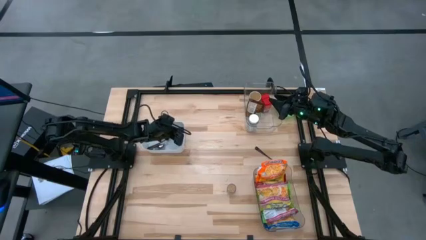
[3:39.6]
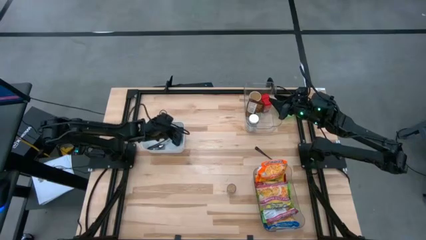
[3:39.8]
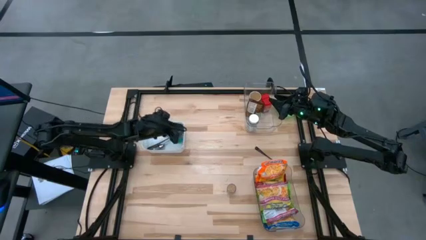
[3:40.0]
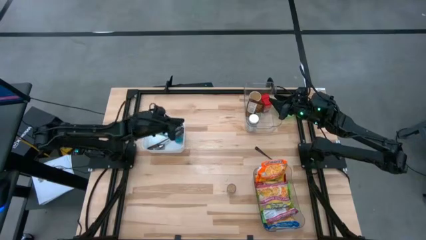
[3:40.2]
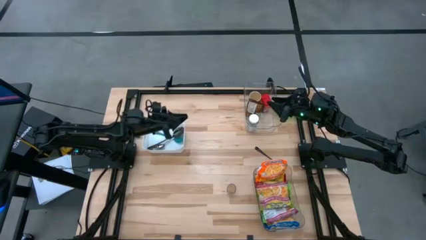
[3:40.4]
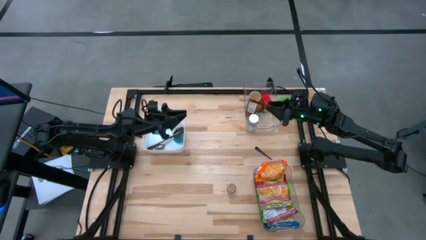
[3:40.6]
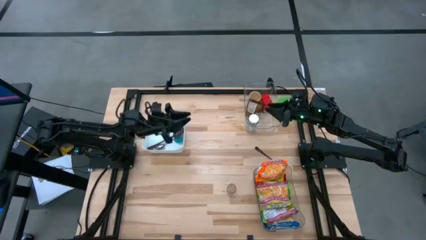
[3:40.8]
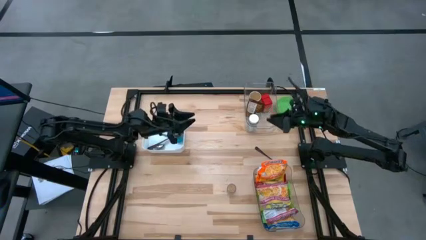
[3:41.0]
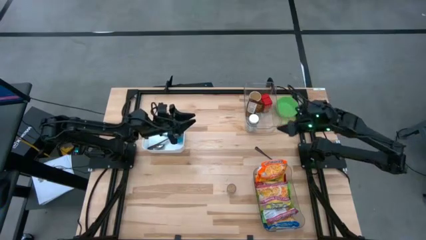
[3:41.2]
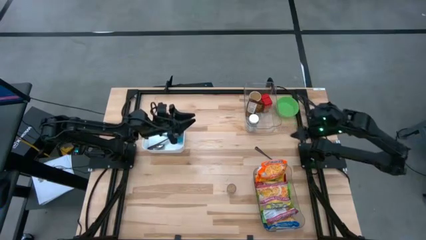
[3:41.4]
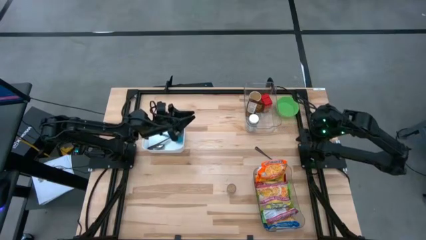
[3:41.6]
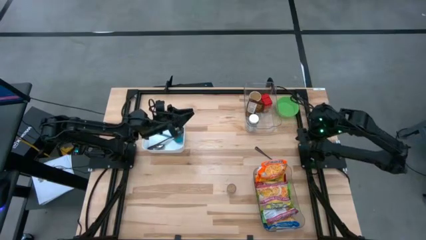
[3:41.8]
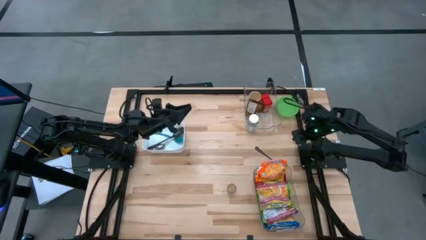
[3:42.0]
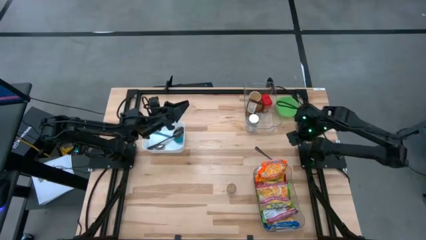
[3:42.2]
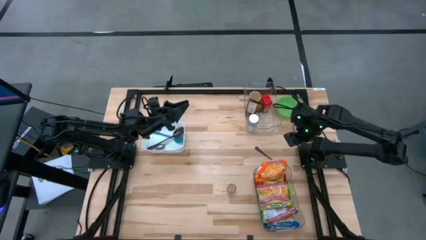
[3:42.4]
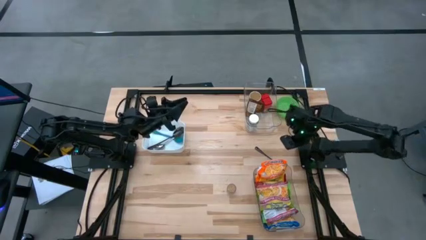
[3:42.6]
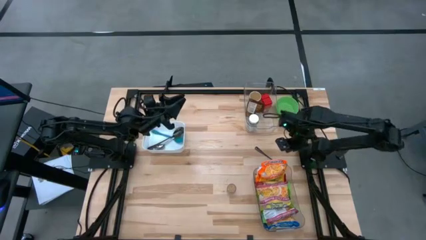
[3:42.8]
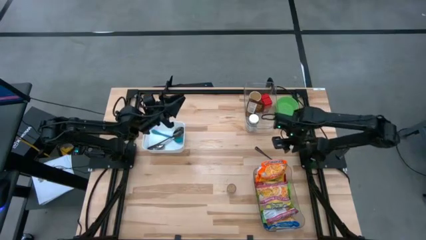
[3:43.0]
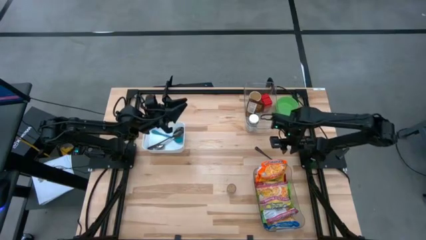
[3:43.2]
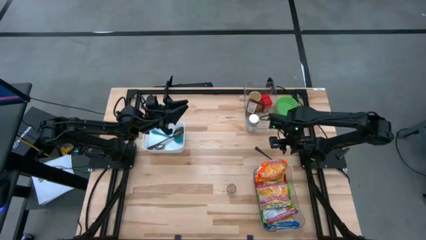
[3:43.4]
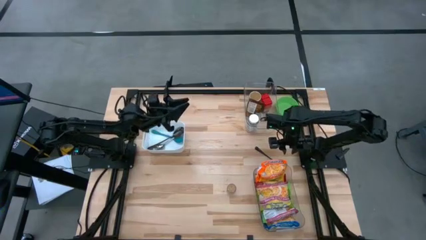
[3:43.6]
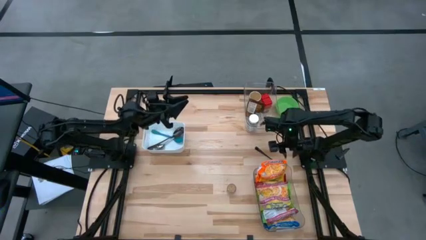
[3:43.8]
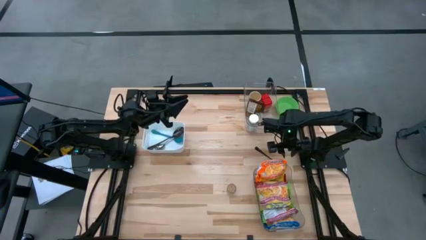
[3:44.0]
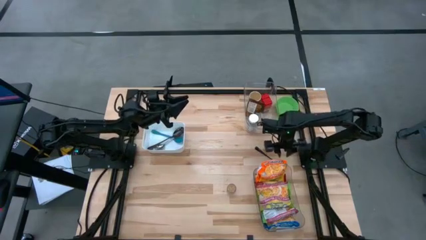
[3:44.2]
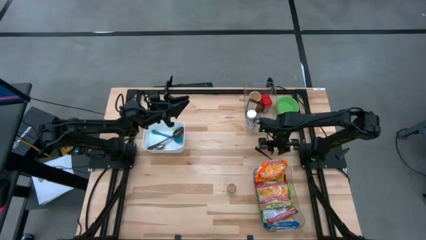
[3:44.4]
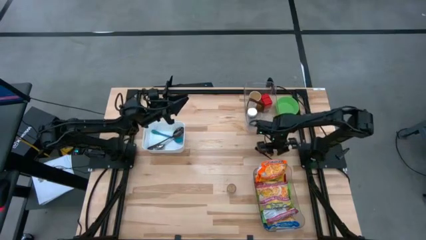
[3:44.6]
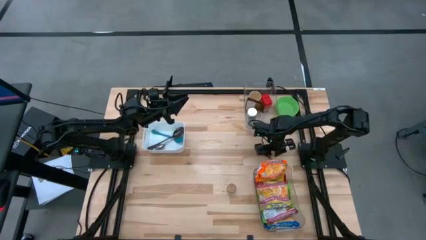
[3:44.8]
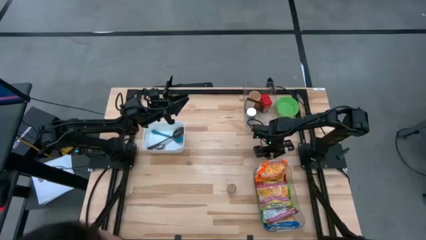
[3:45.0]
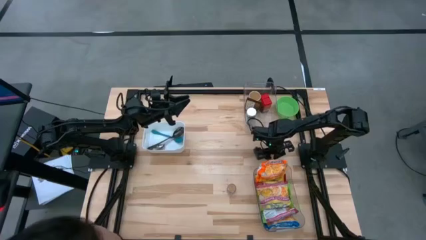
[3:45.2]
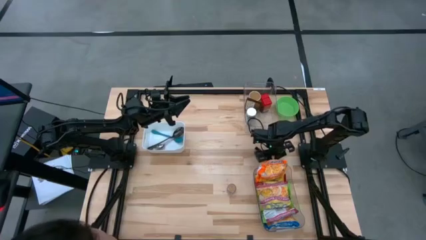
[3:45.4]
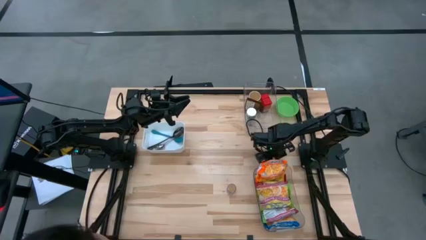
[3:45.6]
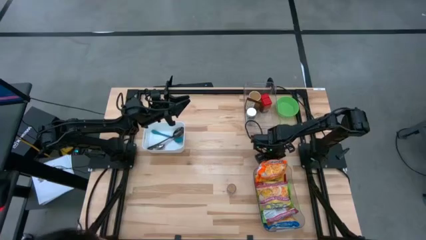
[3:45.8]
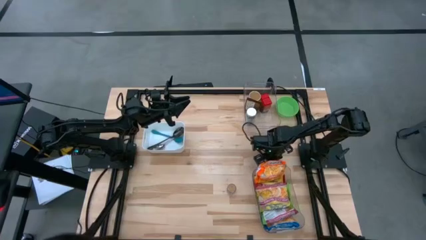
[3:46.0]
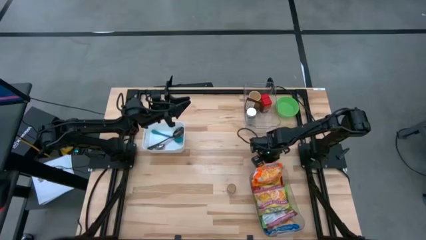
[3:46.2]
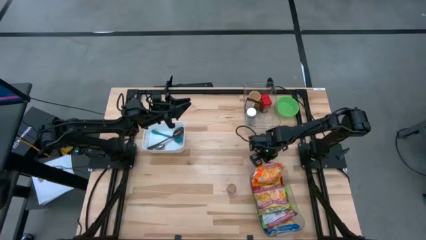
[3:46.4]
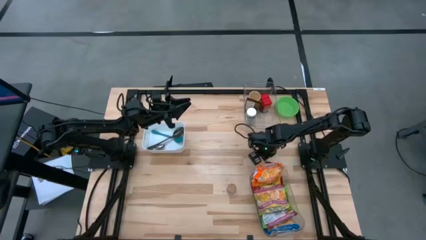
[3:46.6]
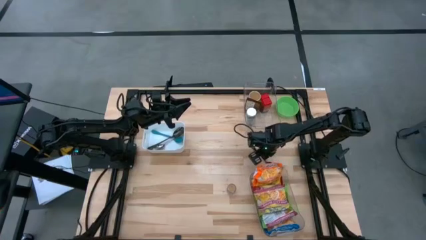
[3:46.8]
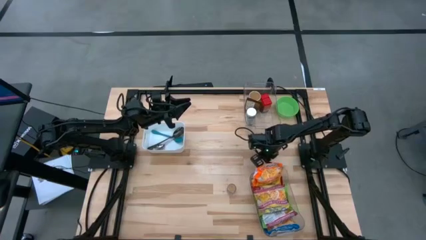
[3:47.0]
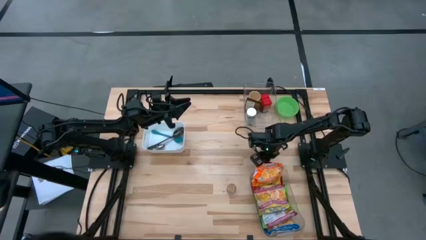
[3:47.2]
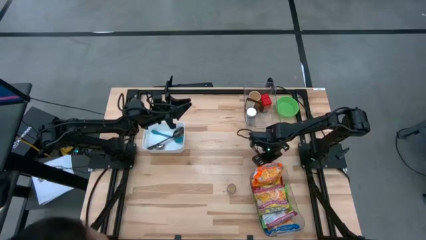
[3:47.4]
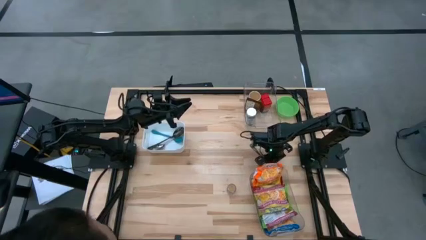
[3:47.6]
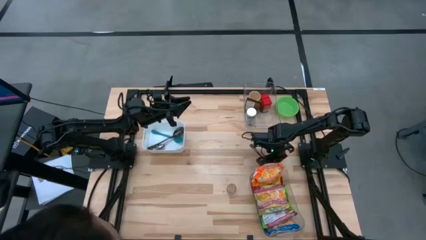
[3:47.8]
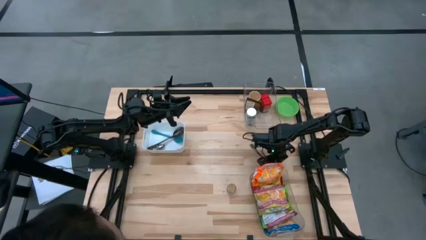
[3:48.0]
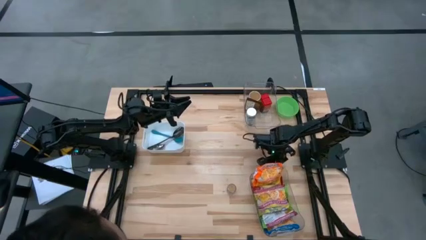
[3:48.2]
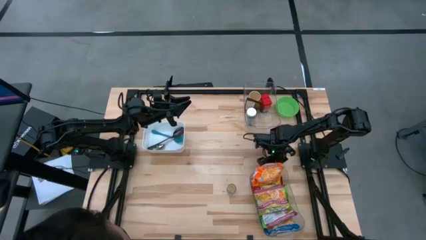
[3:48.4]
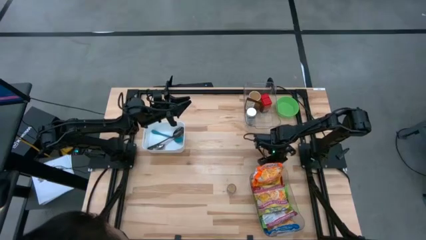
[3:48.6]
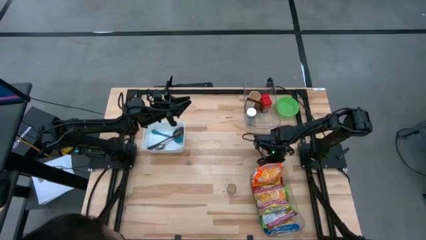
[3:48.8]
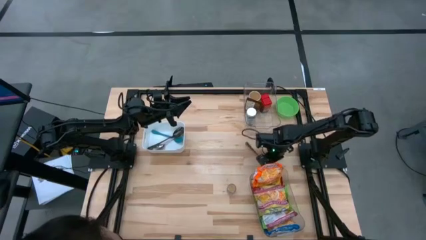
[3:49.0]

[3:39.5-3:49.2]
Task: Pick & Place Food Item
Put the black spoon into the white bin

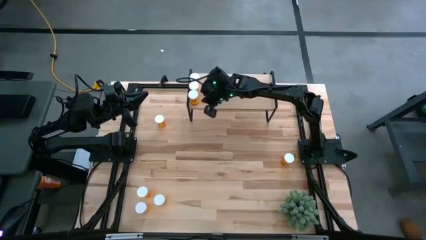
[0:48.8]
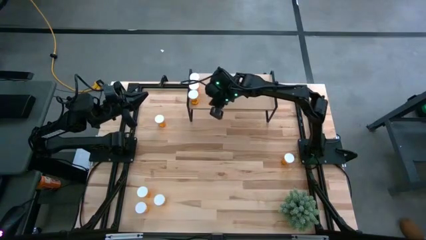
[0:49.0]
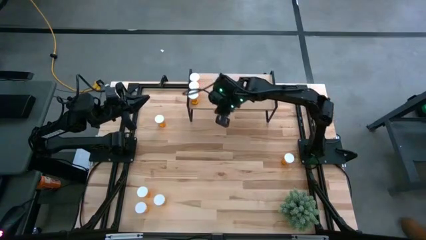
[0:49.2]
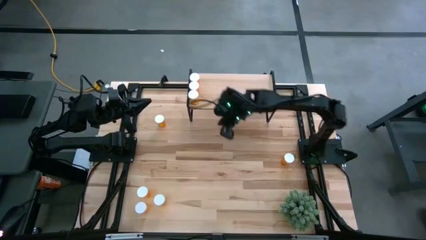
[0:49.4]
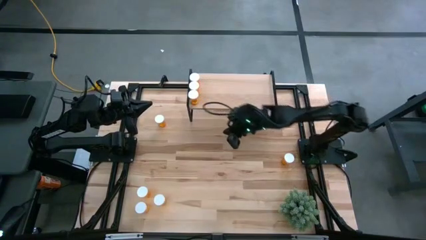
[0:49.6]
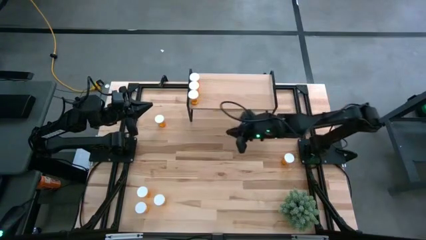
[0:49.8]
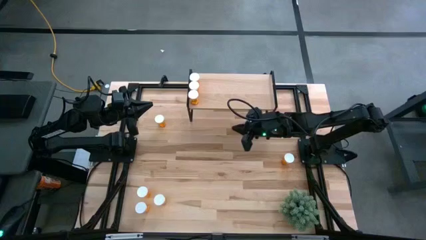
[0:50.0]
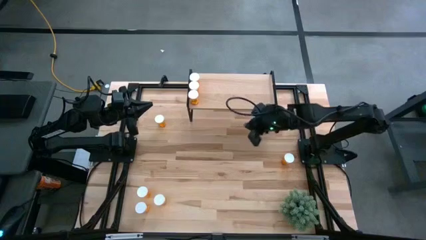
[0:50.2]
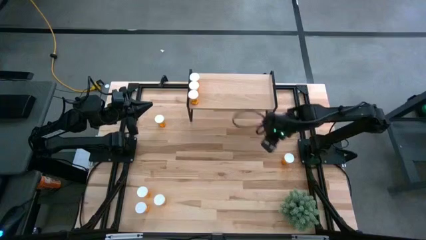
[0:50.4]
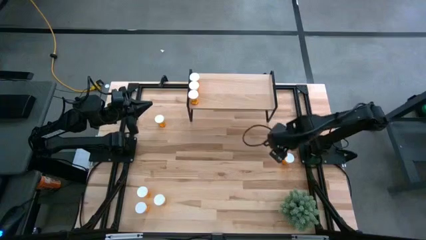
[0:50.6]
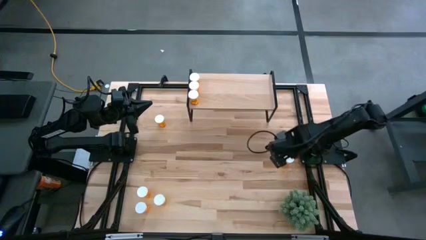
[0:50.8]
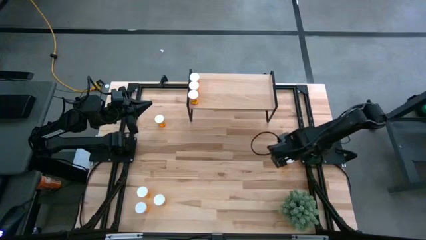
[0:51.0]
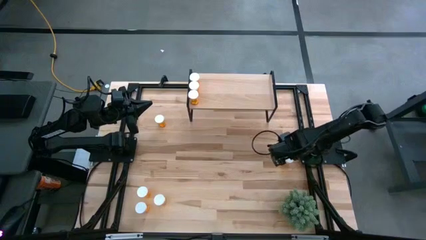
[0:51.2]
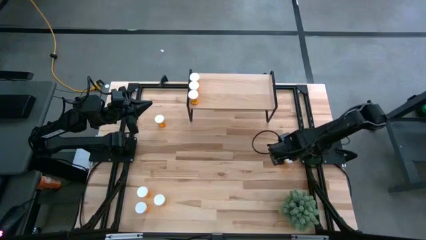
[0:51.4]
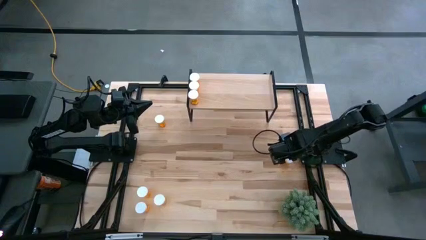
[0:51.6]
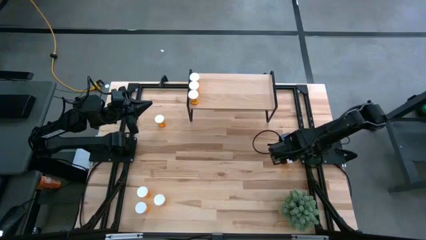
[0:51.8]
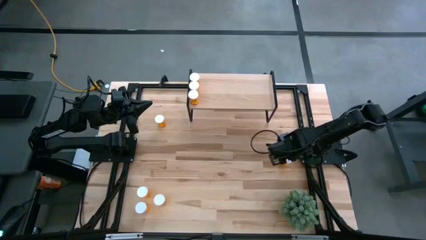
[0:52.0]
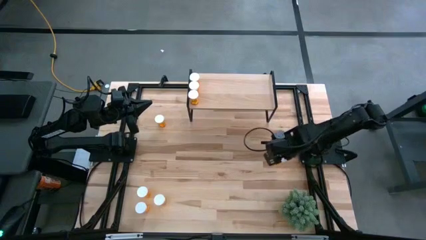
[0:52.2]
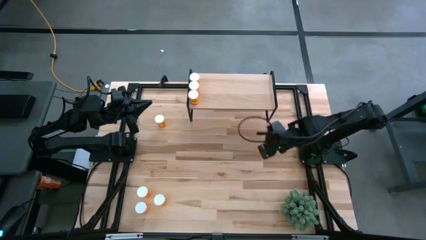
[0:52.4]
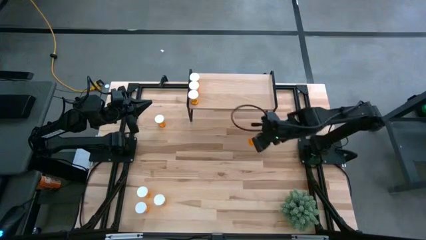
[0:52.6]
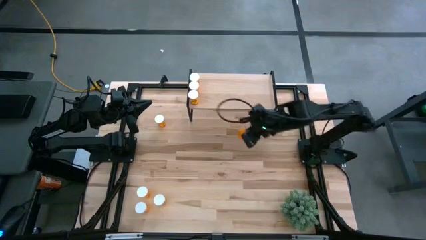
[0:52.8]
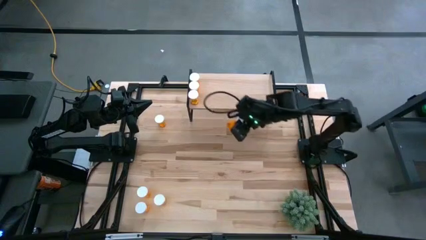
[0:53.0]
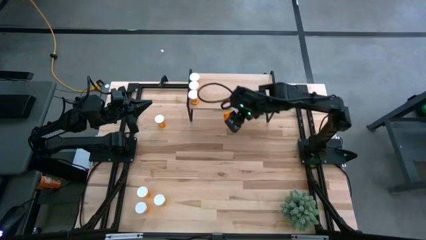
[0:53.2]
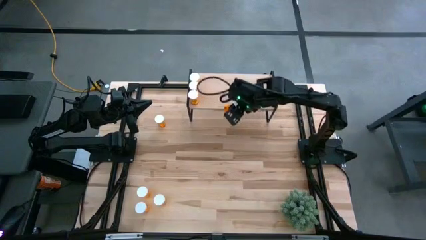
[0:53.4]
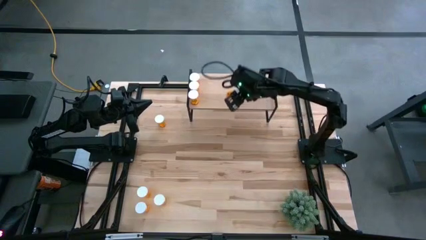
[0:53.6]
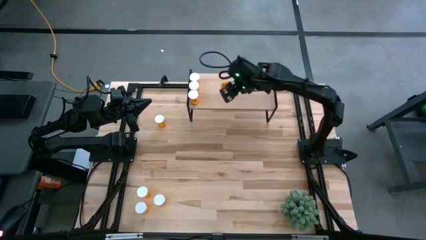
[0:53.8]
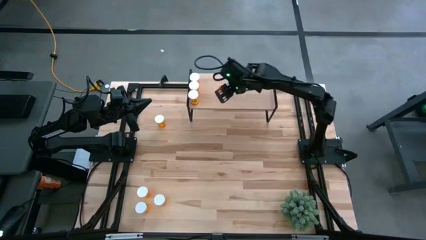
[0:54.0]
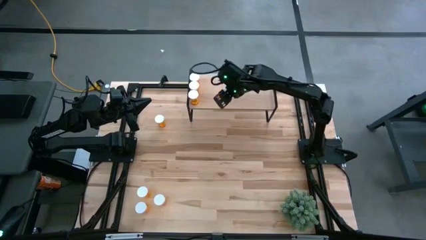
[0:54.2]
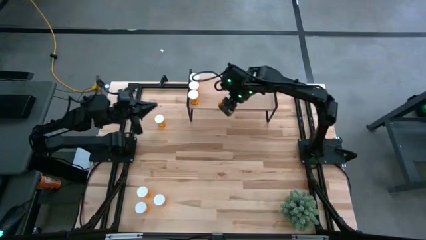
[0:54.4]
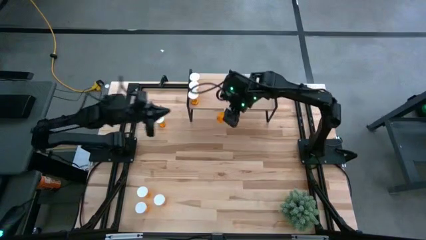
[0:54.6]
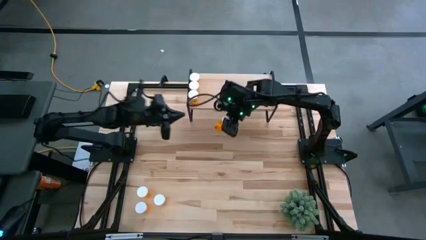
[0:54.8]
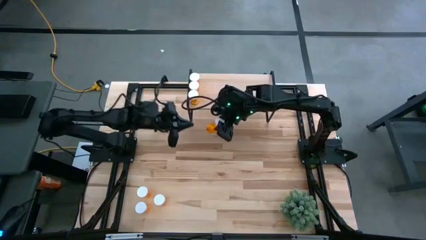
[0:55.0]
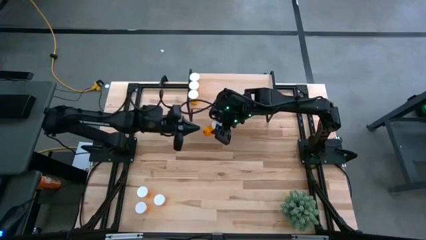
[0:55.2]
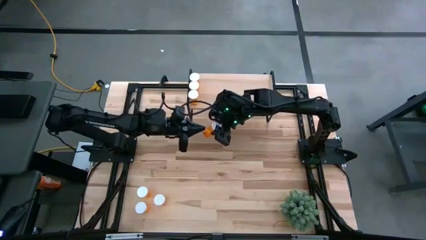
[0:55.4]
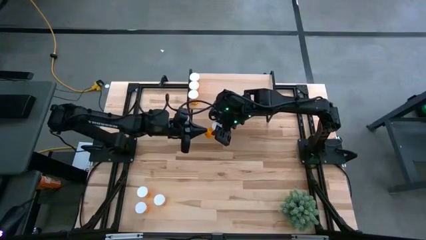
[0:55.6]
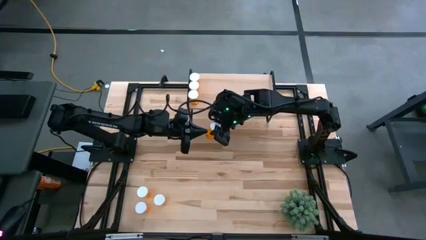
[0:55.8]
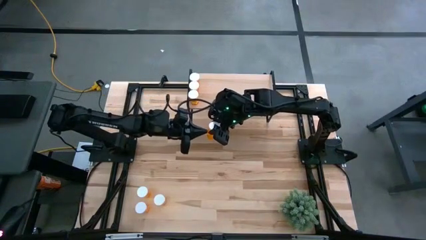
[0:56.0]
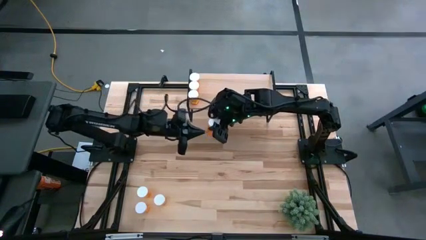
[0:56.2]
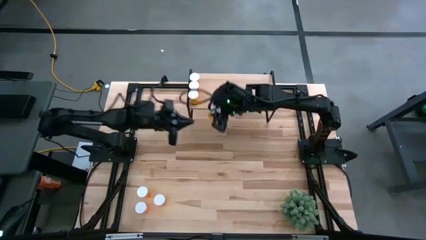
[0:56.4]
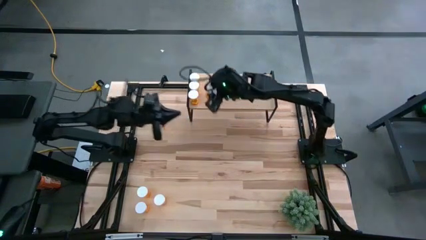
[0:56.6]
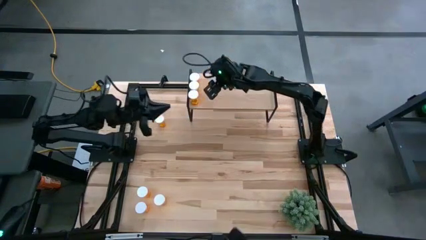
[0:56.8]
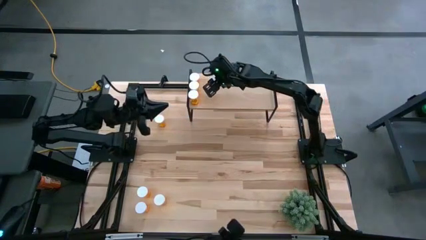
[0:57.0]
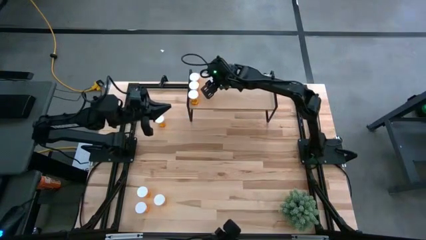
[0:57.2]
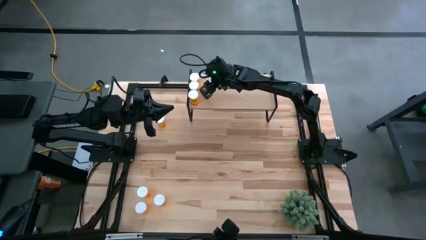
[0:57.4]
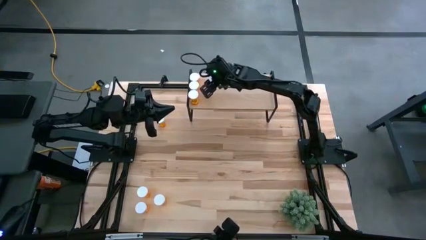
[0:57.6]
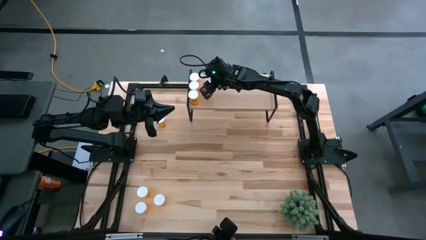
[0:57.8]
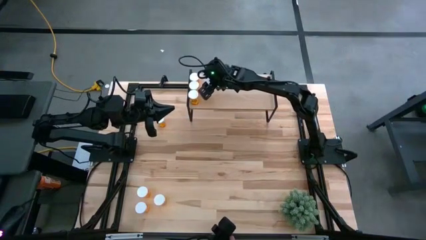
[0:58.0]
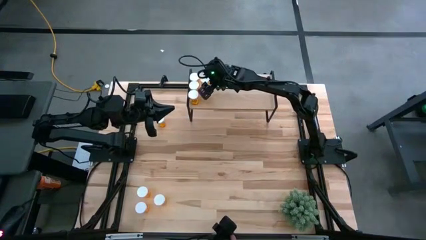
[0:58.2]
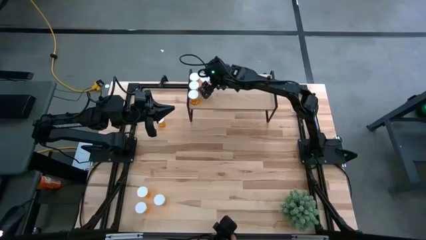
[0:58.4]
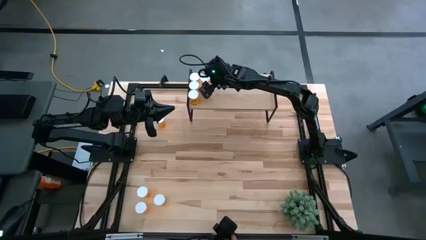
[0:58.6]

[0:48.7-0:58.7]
Task: Pick and place medicine bottles onto shelf by color
Put the orange pill bottle on the shelf
